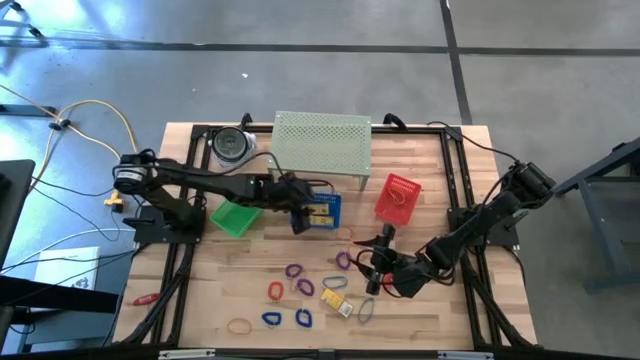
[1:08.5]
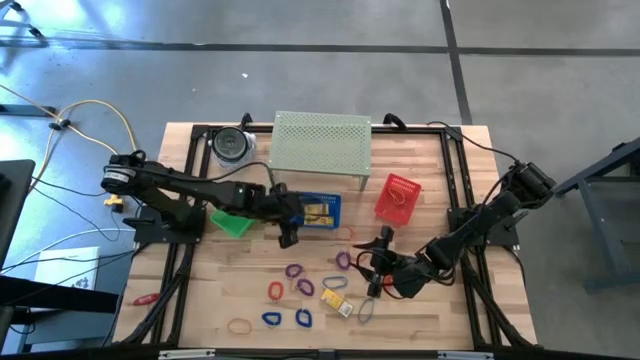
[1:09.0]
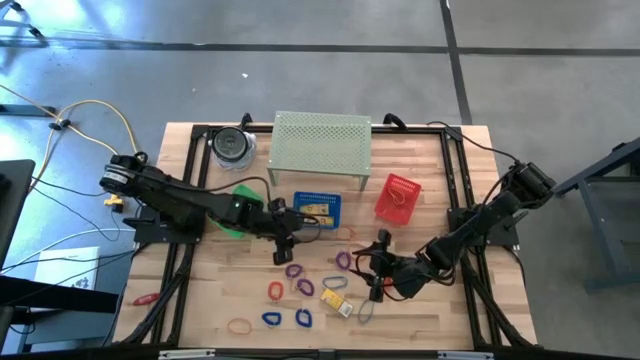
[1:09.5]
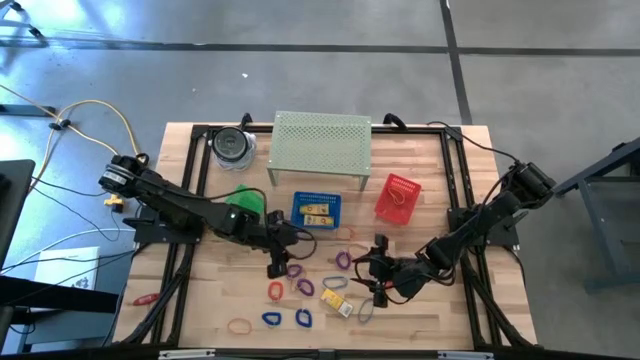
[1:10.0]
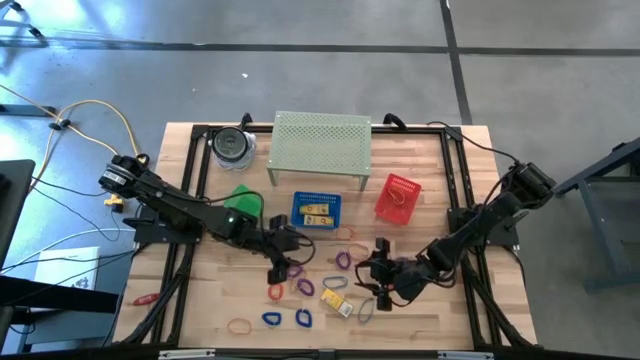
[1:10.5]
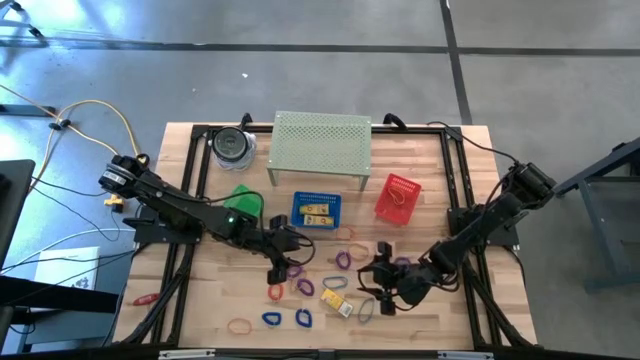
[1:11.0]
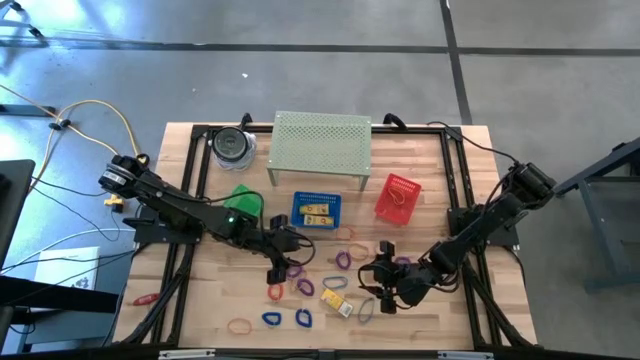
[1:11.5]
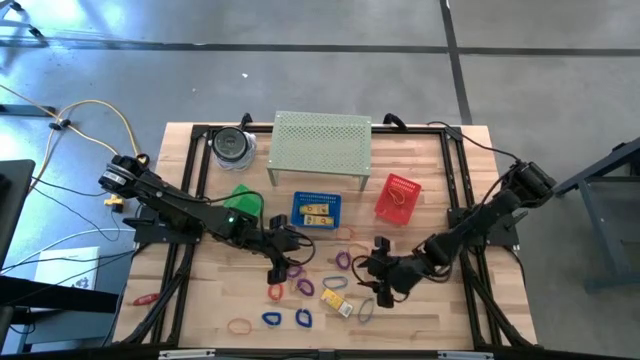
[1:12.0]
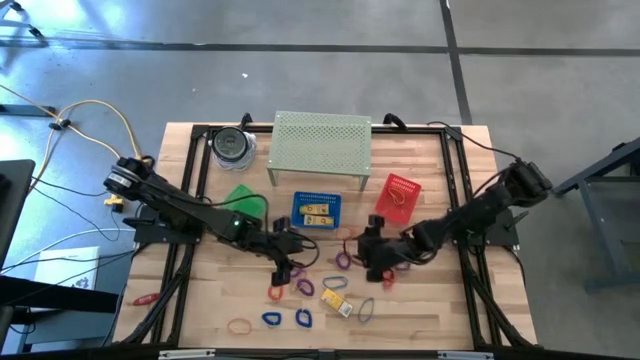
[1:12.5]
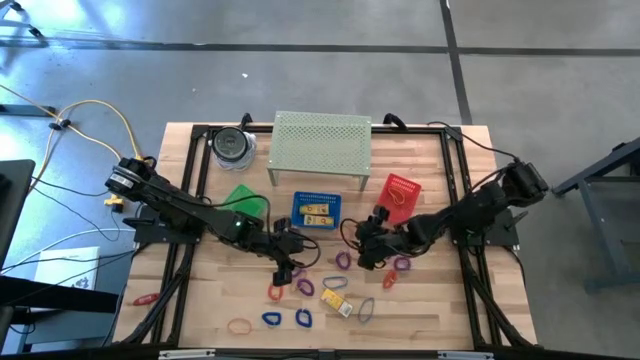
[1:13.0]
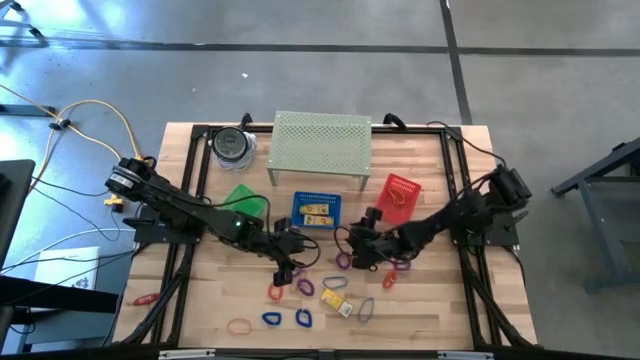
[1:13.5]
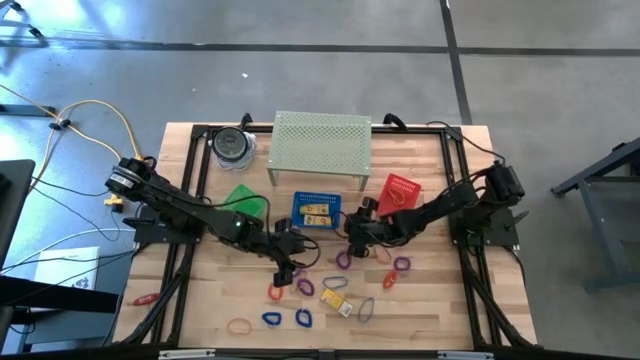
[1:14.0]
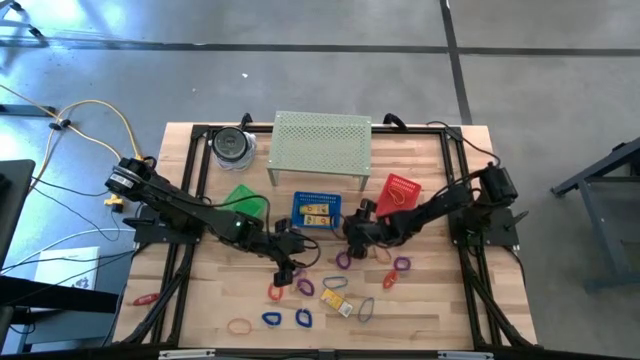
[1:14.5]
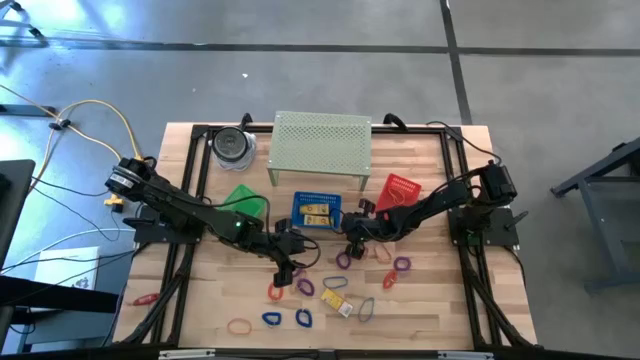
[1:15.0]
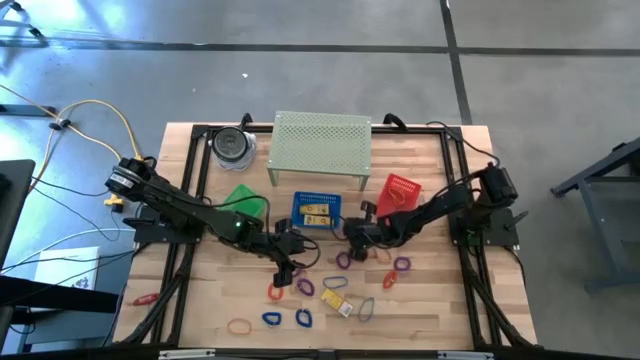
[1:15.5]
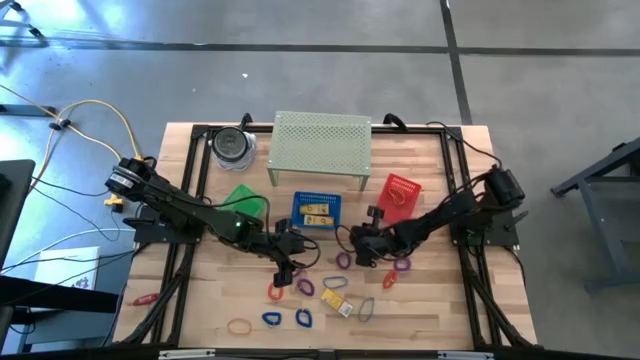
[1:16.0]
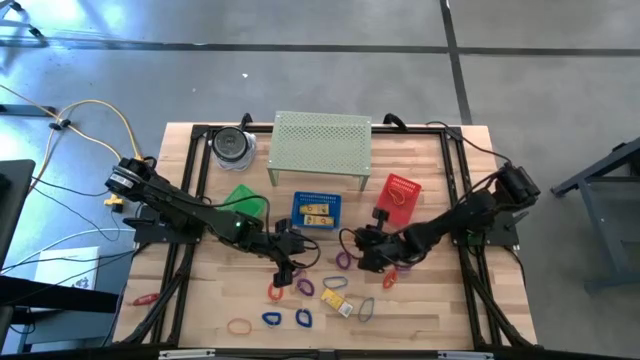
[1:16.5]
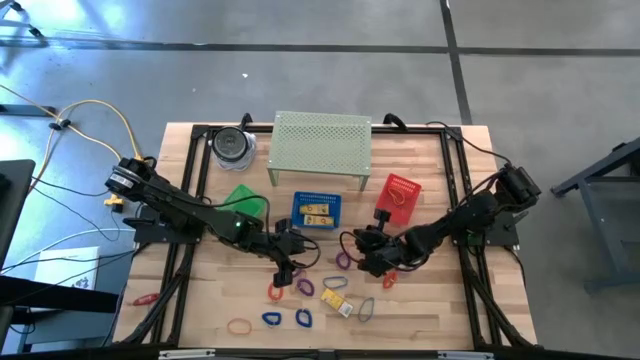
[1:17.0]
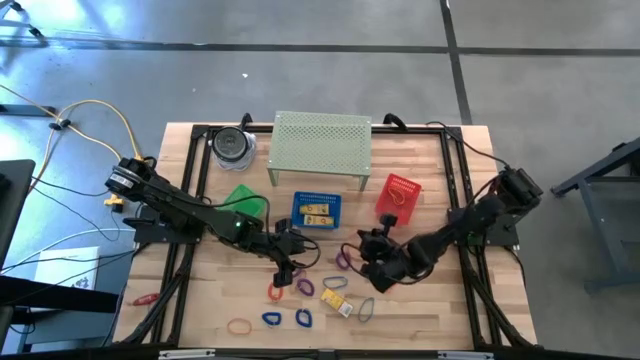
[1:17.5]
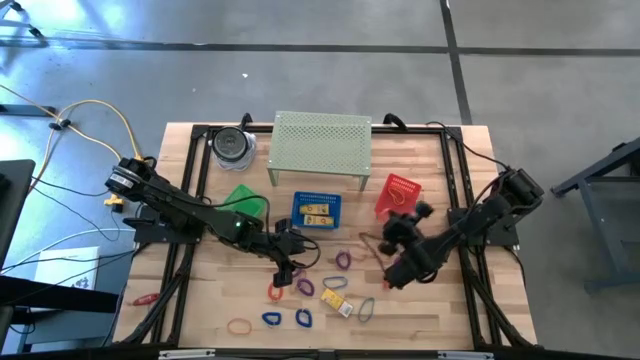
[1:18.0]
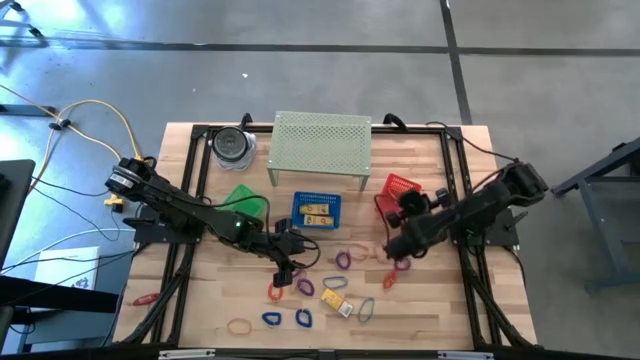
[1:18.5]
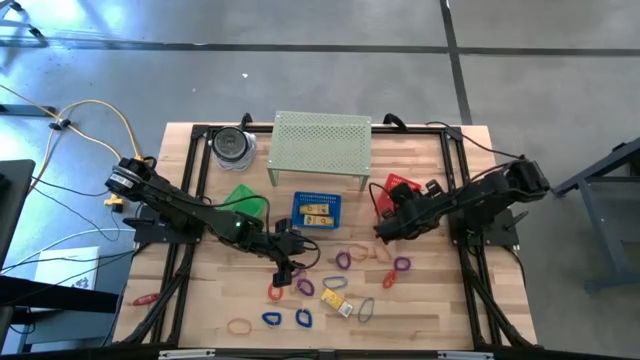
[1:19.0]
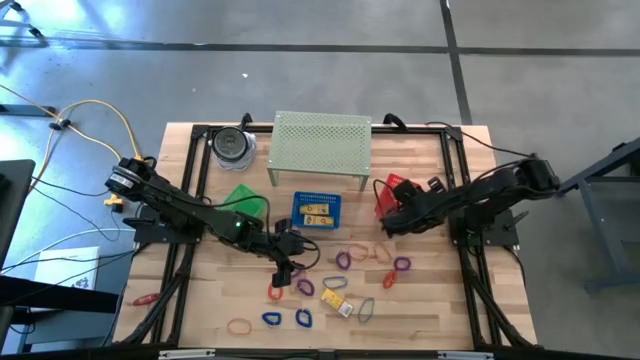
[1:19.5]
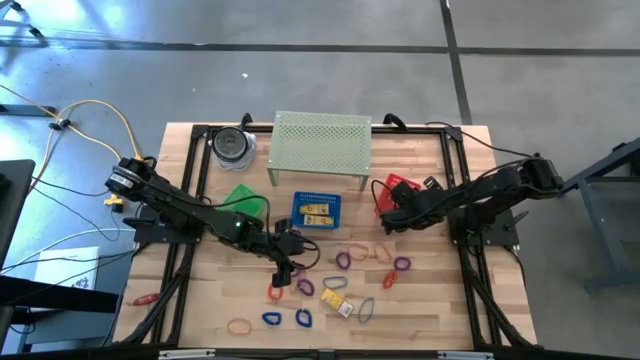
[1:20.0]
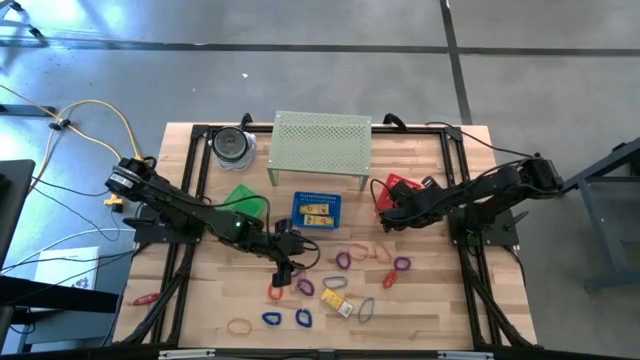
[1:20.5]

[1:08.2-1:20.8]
Task: Pick & Place Office Desk Supplies
Put the orange rubber band into the red bin

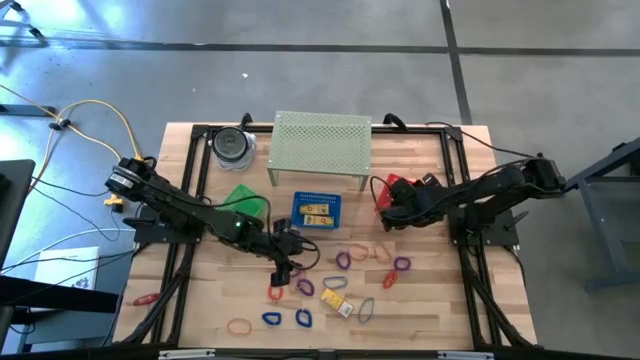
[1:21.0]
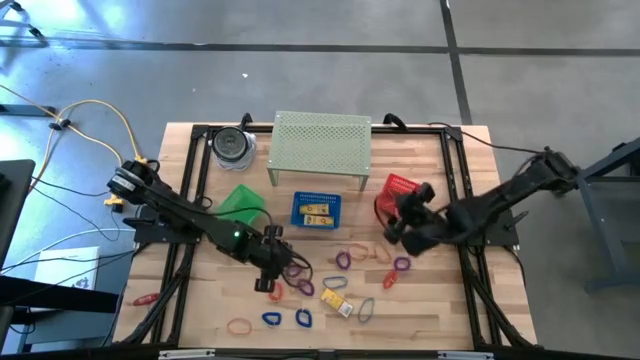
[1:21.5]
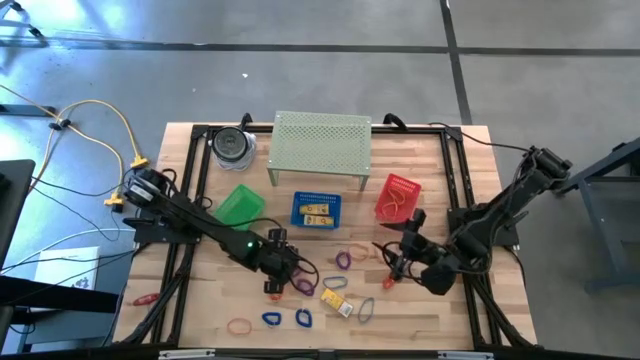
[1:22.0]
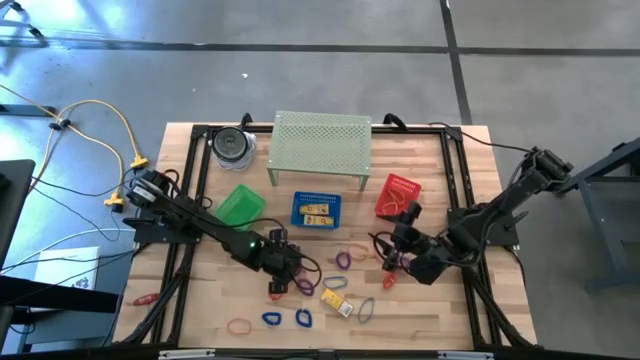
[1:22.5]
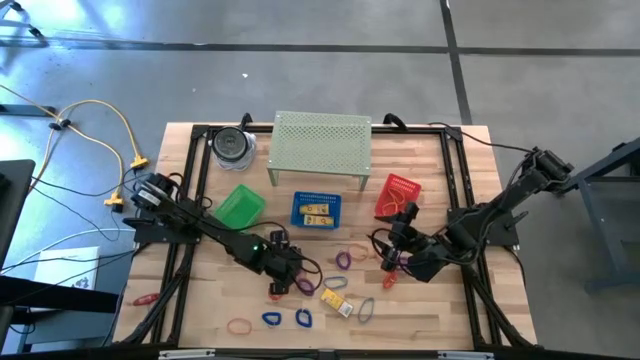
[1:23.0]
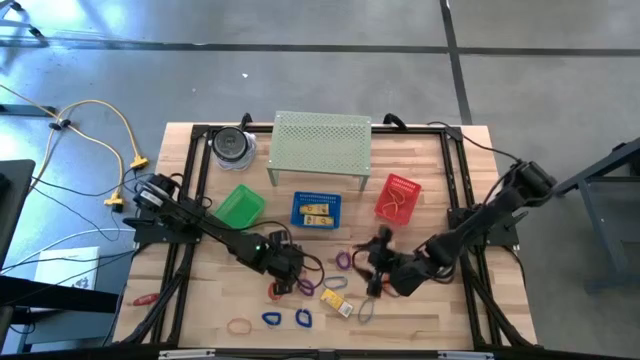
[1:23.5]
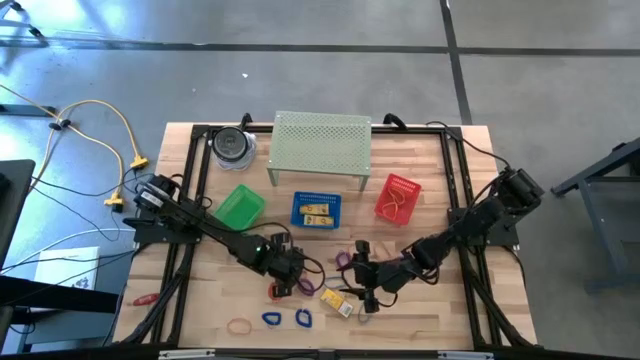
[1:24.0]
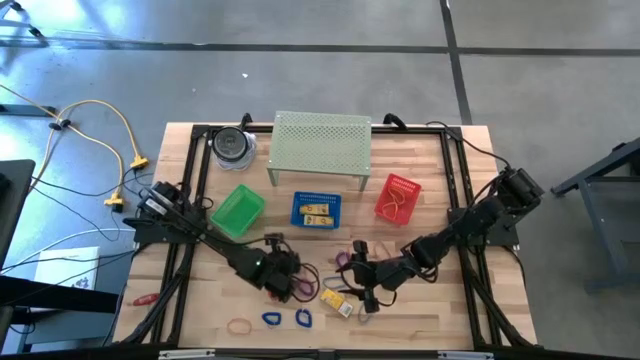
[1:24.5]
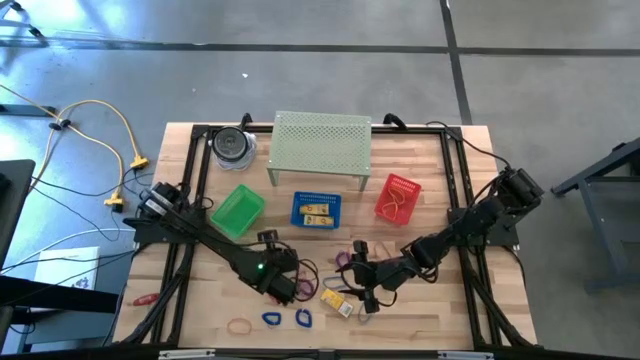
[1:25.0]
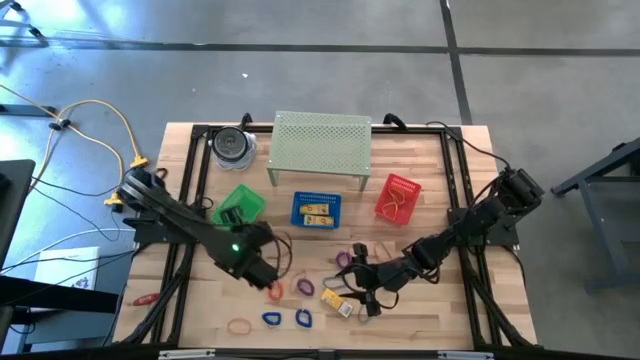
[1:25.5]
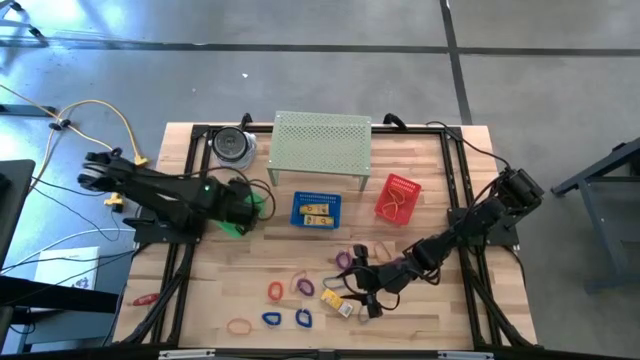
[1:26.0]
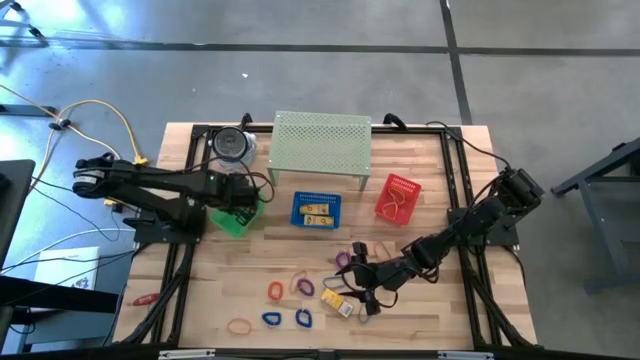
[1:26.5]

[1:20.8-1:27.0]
Put the purple spring keychain into the green bin

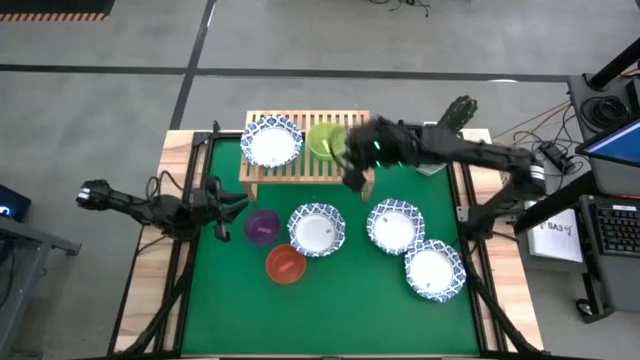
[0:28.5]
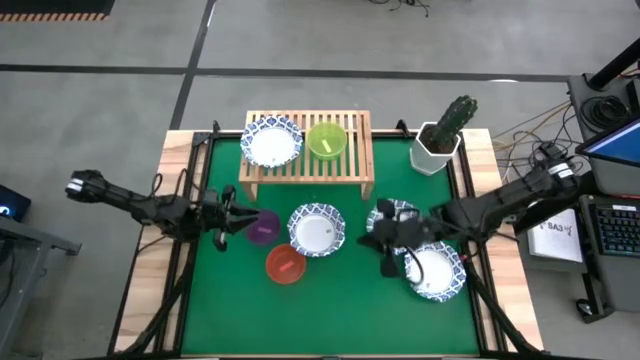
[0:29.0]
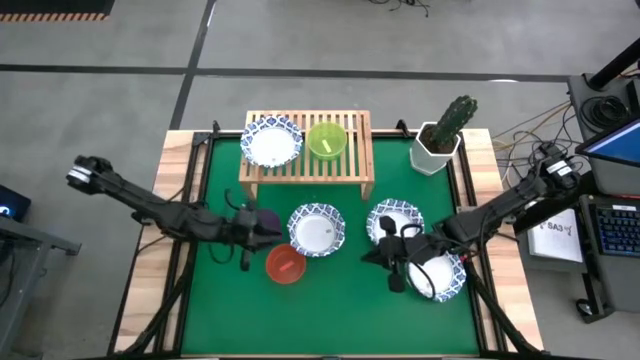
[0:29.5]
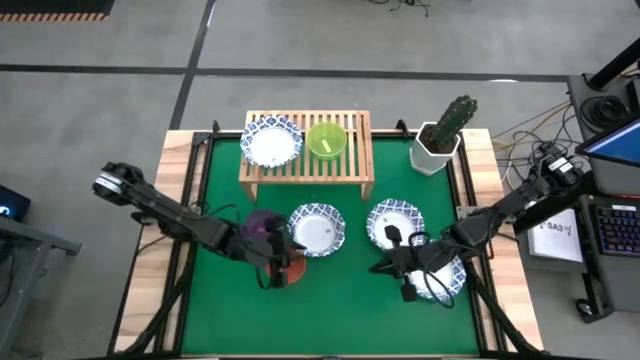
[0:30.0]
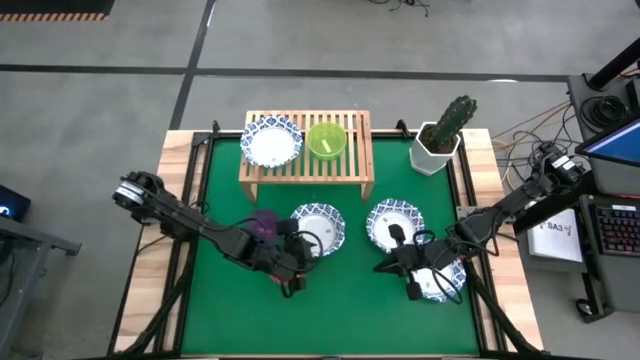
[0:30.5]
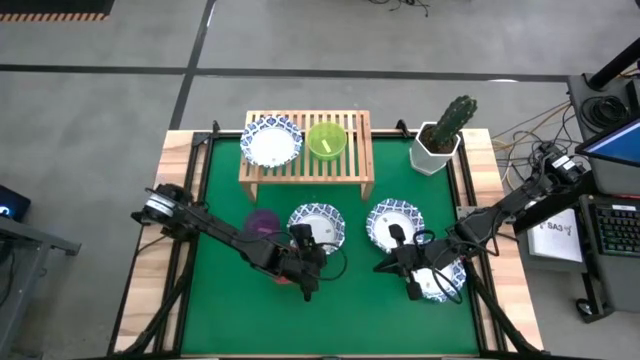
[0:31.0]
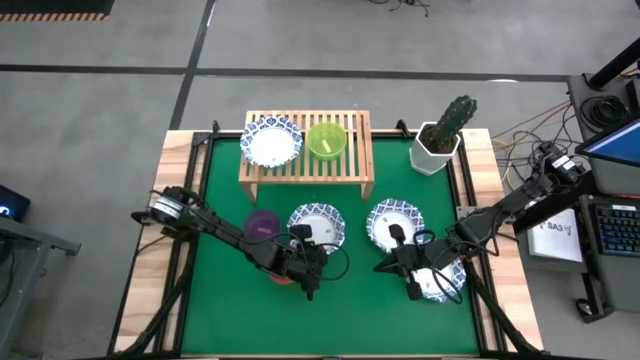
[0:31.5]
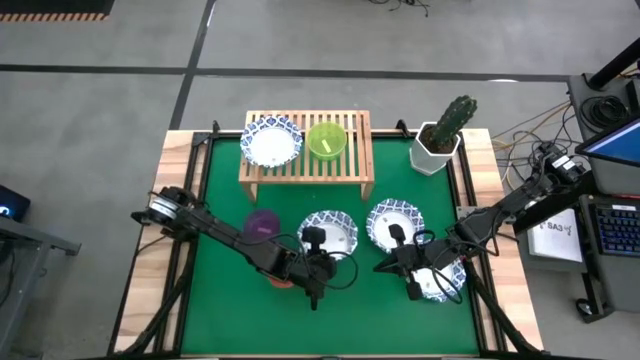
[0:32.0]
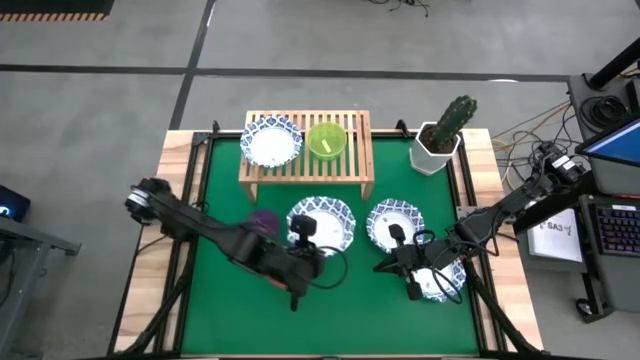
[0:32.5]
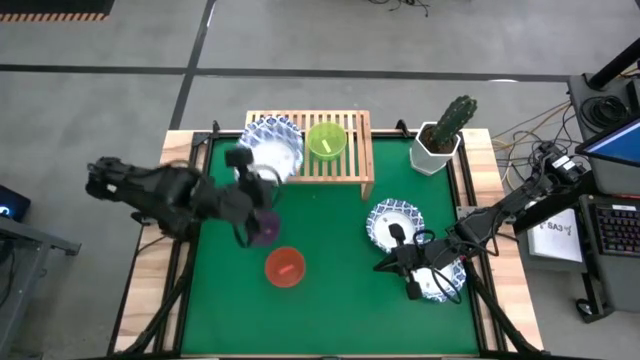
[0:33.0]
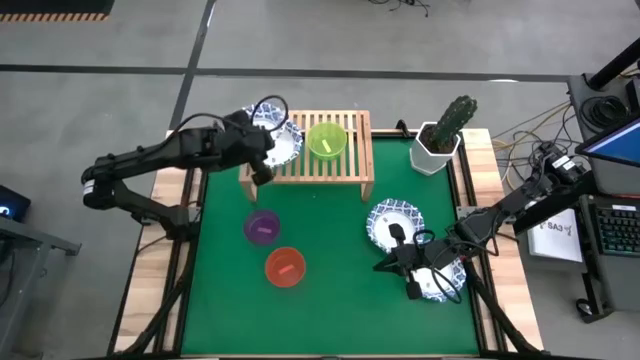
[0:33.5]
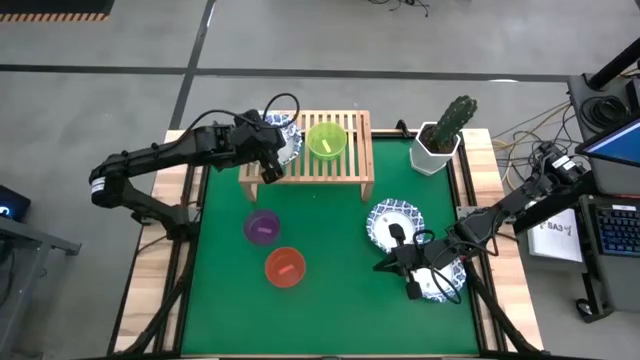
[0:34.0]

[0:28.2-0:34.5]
Task: Place and stack bowls onto a shelf
Stack the large blue patterned on top of the large blue patterned bowl on the shelf
